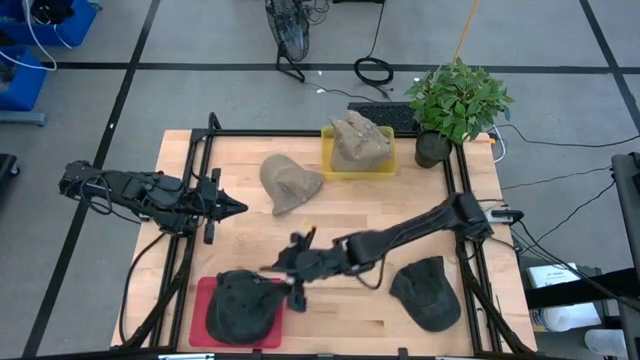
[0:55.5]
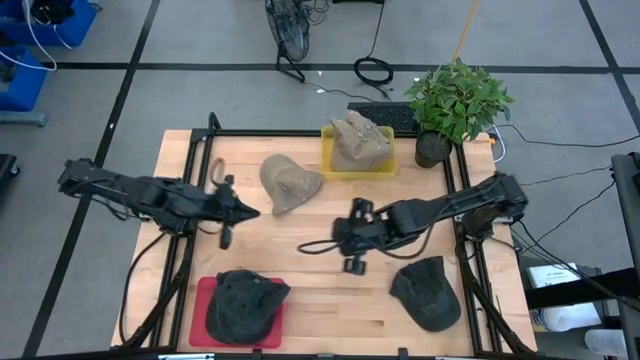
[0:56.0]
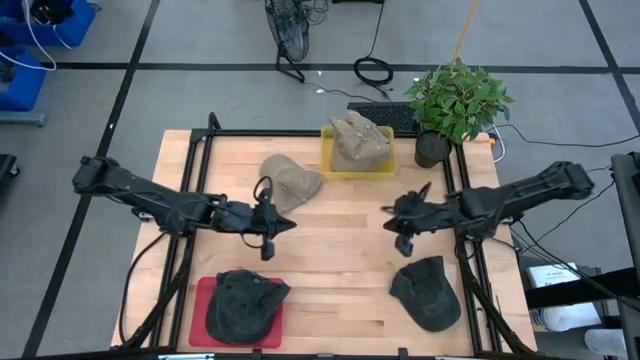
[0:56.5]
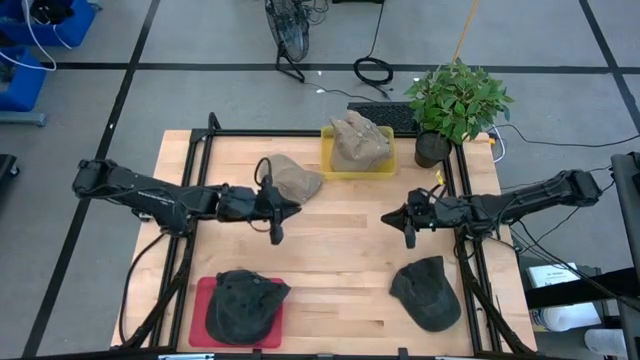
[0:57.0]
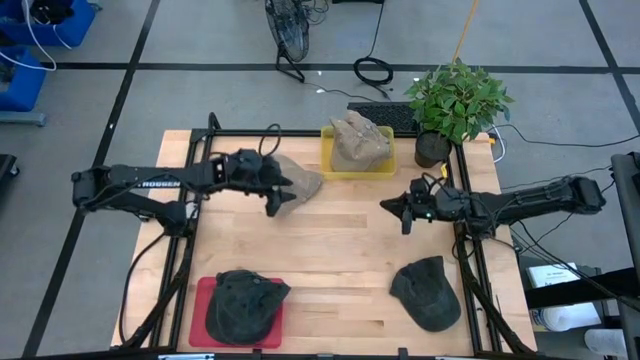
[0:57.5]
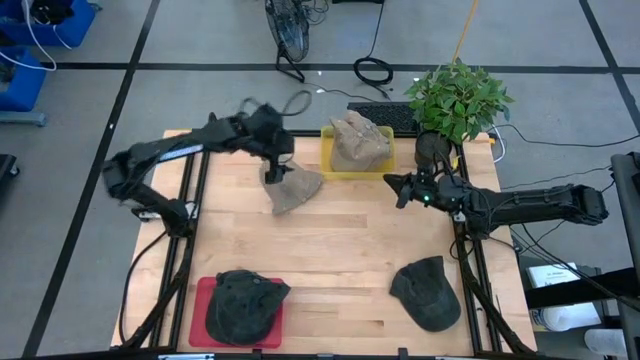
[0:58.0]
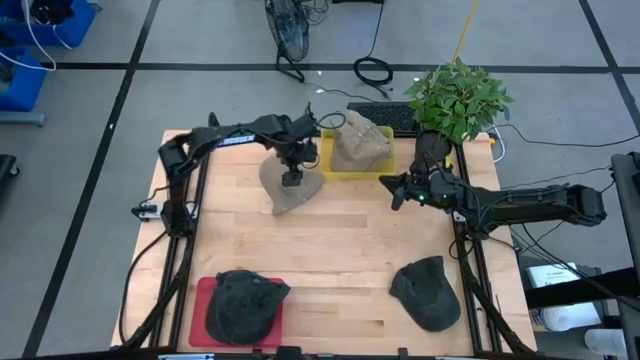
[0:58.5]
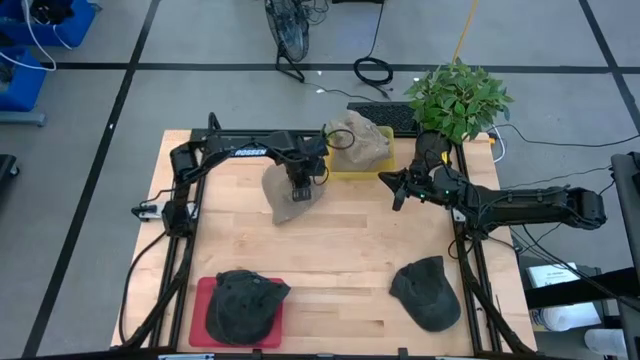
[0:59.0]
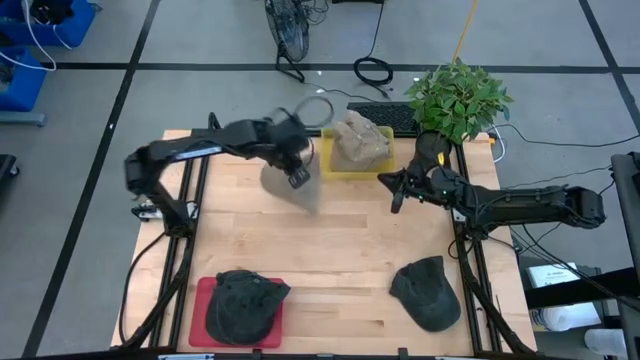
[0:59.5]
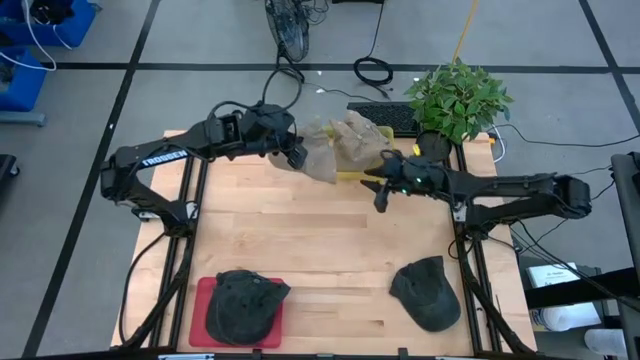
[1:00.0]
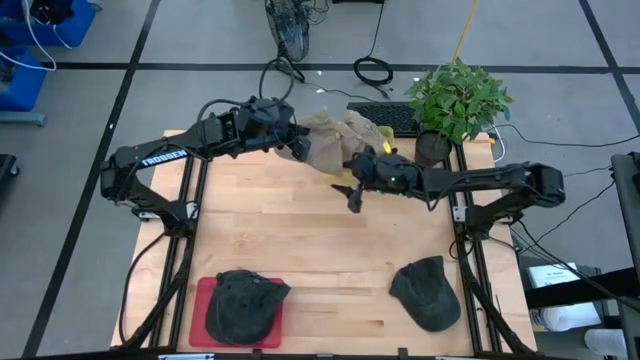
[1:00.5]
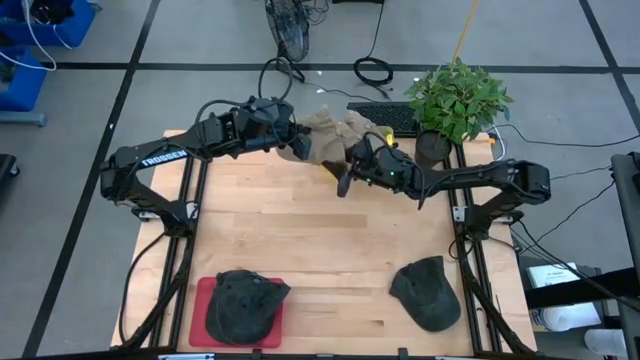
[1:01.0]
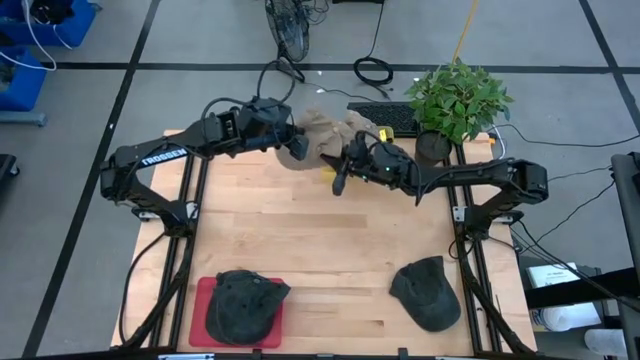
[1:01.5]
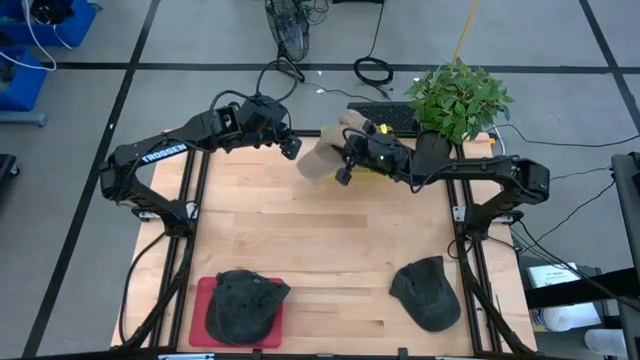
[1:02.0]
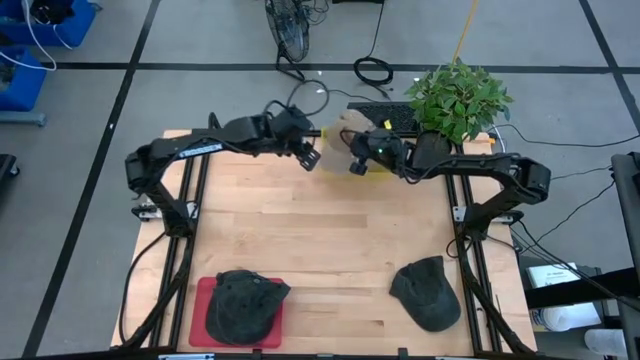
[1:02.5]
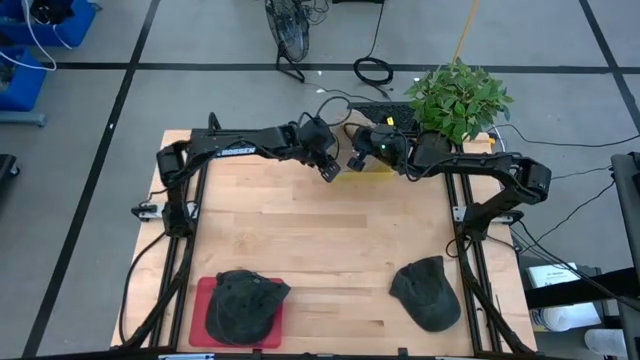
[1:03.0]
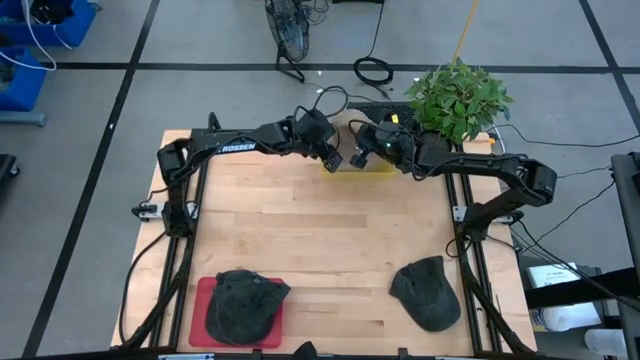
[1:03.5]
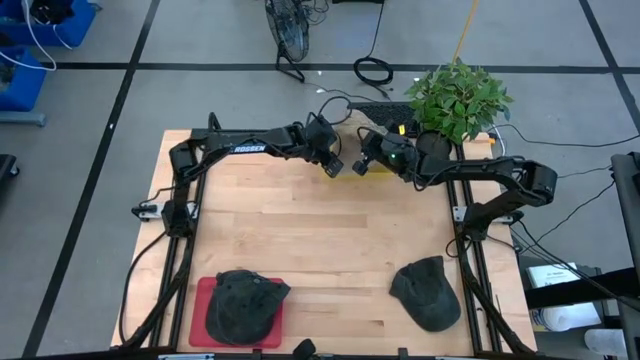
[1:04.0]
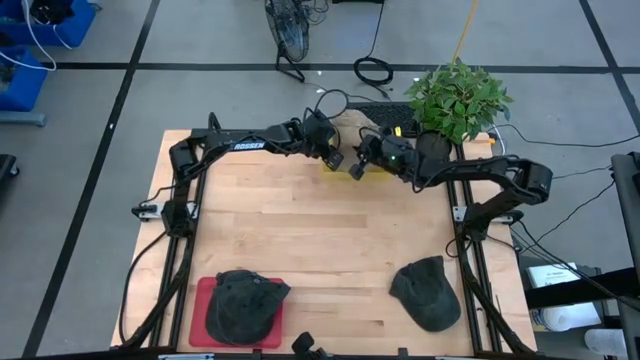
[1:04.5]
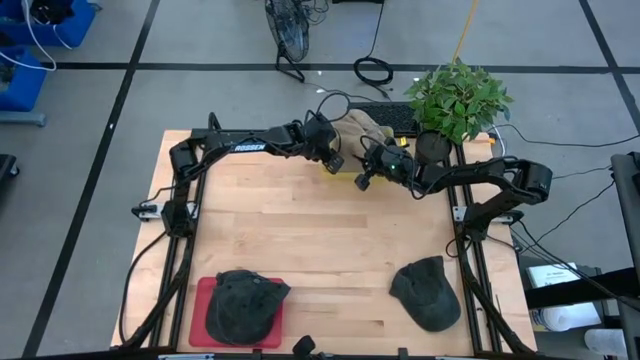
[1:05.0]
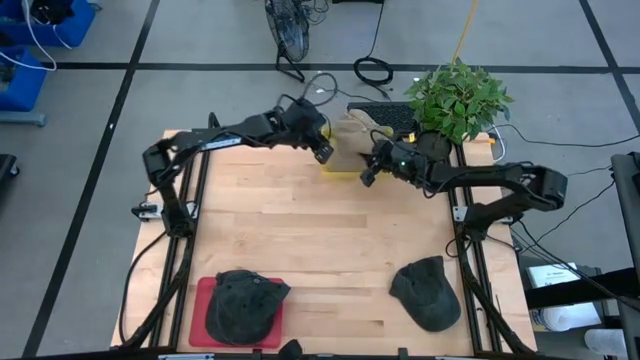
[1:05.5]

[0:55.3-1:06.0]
Task: Pick & Place hat
Put the brown cap into the yellow bin

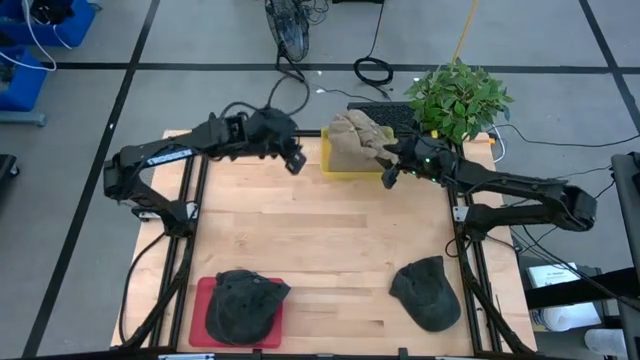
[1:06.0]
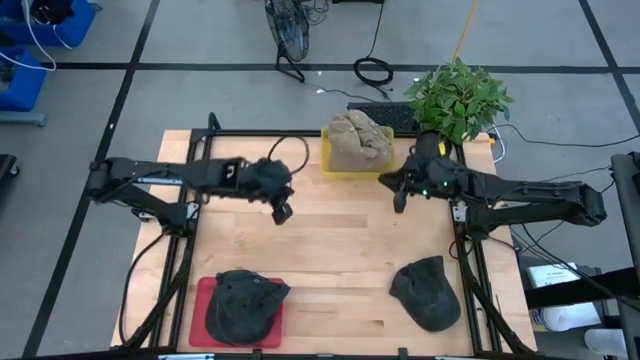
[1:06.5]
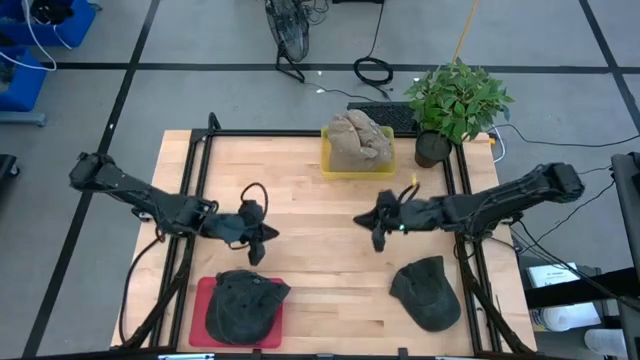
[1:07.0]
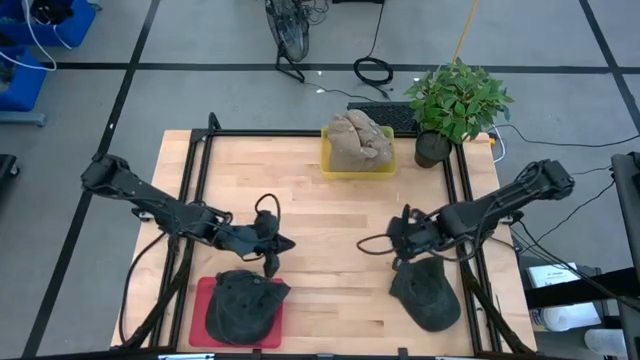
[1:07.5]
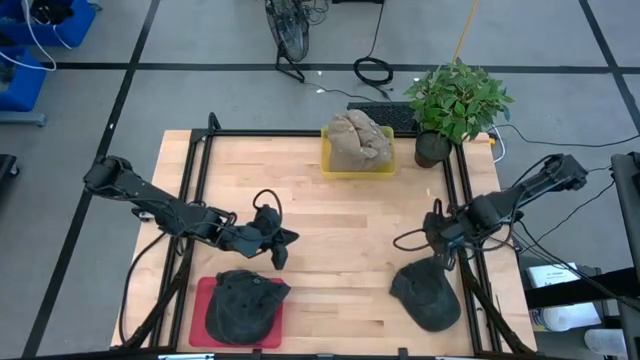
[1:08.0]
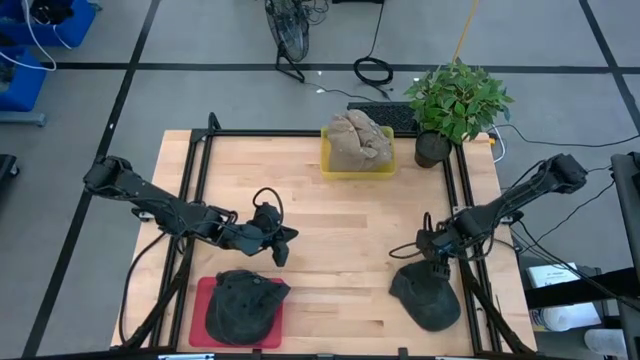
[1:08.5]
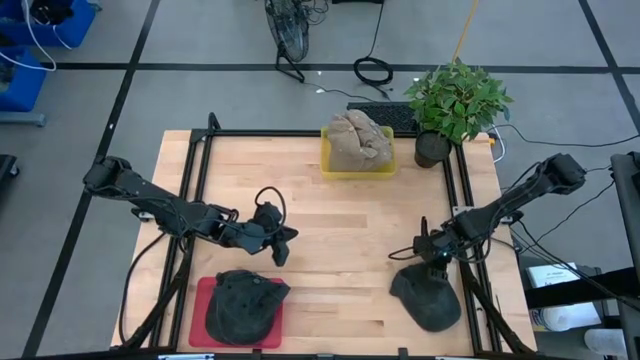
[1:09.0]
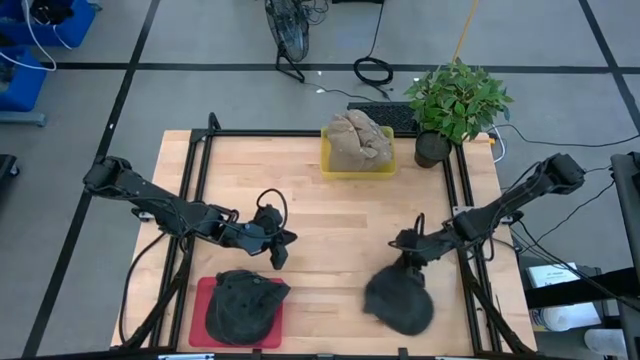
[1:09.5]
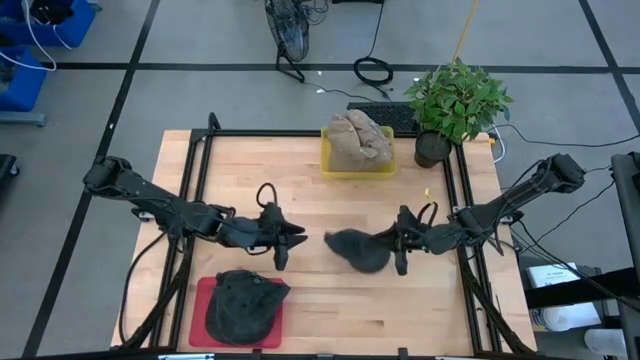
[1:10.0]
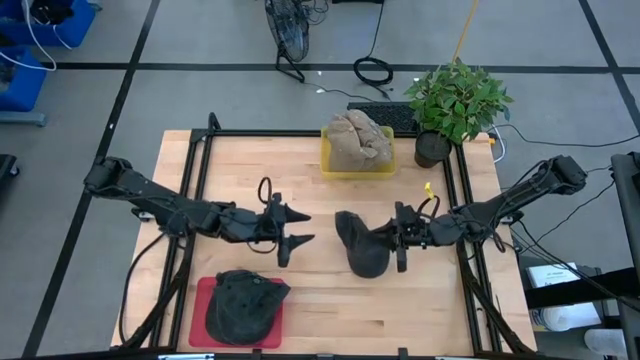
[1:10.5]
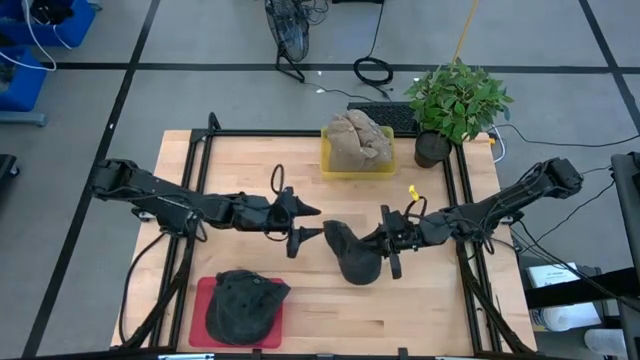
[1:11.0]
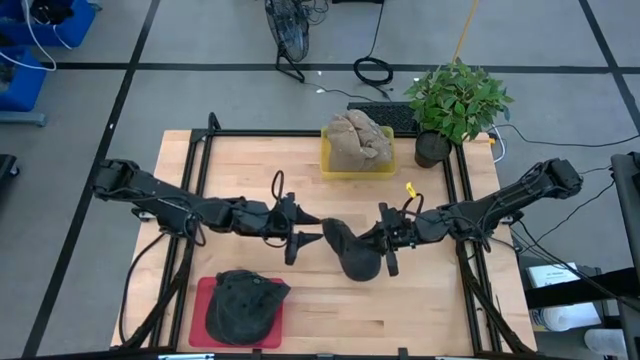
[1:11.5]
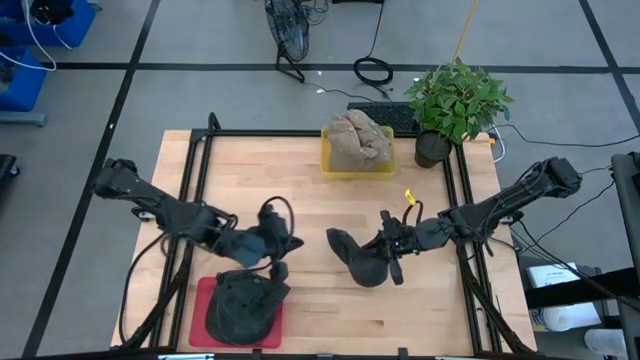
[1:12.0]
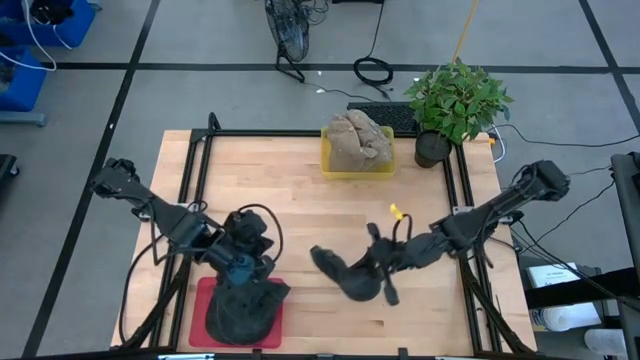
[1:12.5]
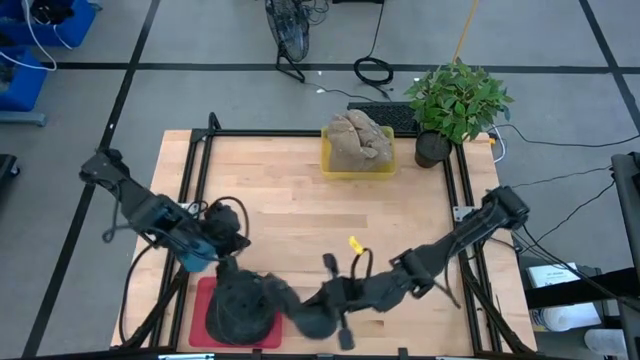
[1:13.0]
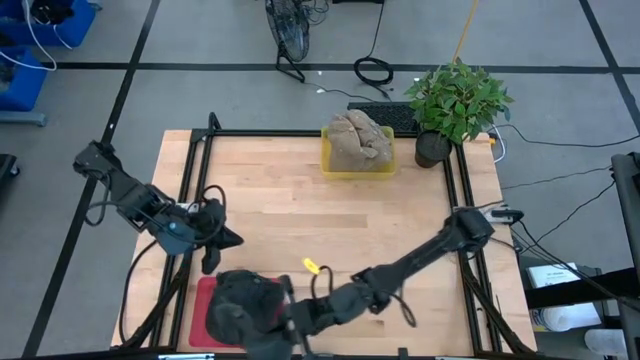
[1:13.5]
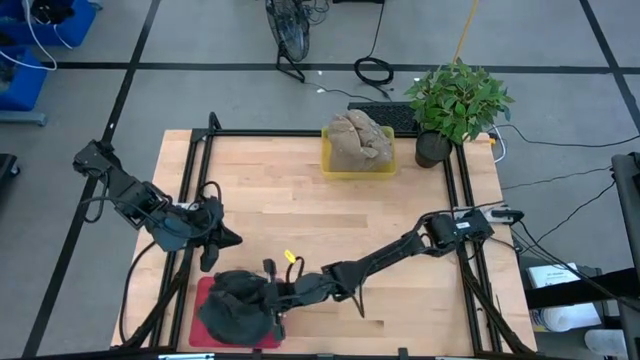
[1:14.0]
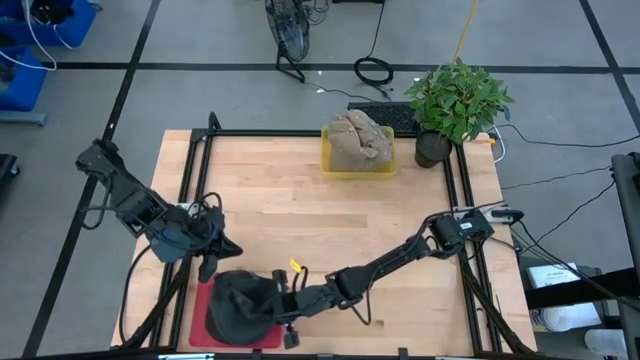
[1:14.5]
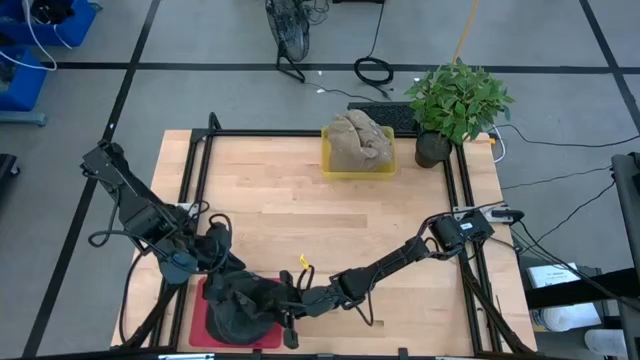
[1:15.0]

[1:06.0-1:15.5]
Put the black cap into the red bin
